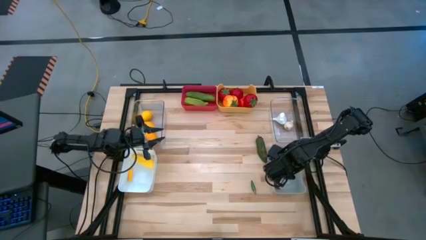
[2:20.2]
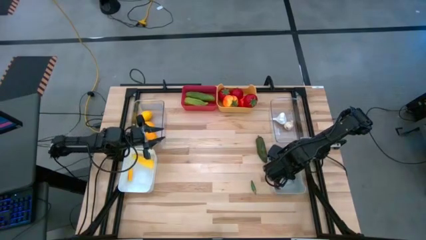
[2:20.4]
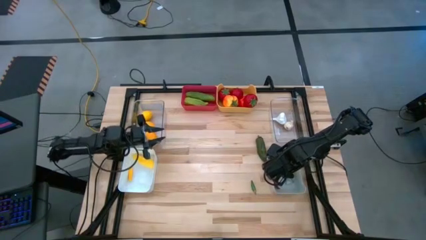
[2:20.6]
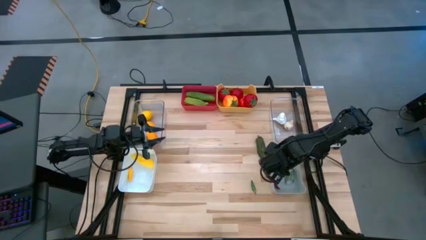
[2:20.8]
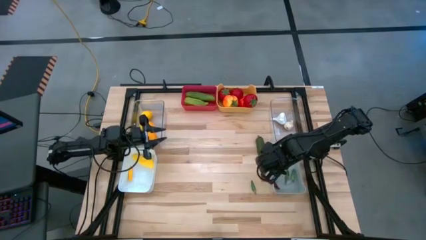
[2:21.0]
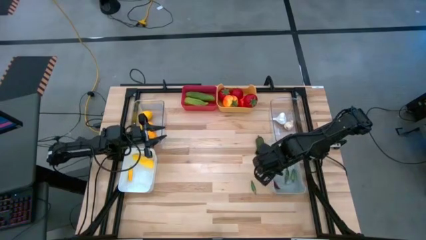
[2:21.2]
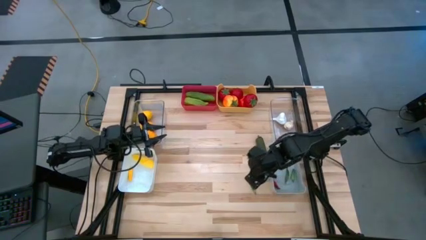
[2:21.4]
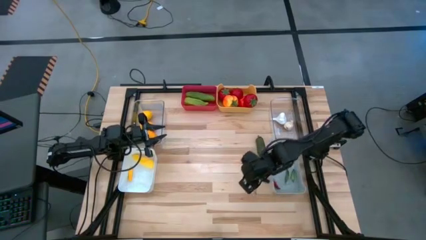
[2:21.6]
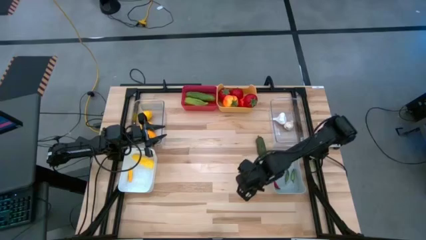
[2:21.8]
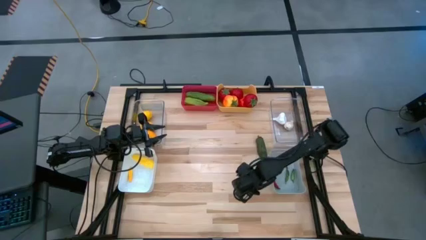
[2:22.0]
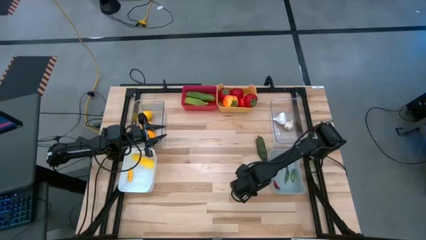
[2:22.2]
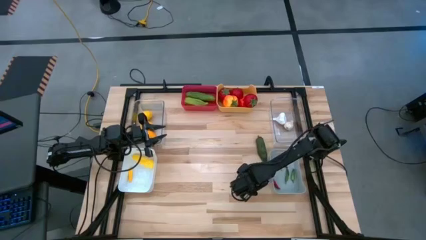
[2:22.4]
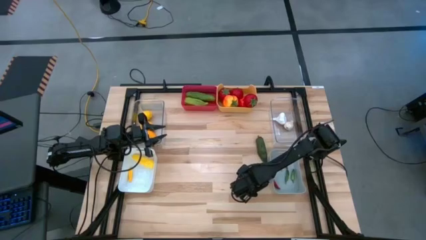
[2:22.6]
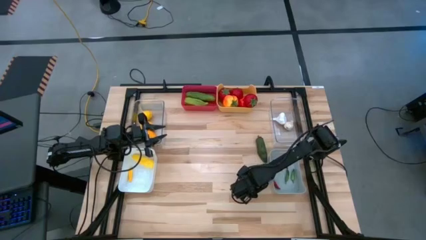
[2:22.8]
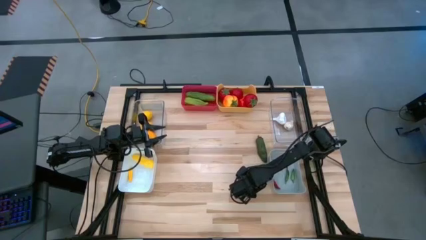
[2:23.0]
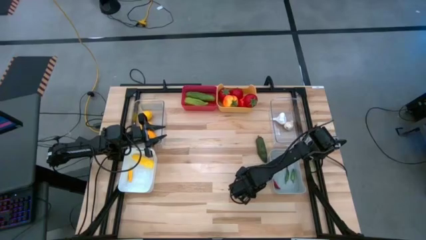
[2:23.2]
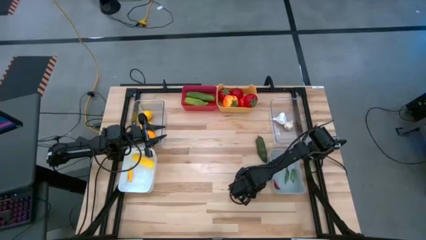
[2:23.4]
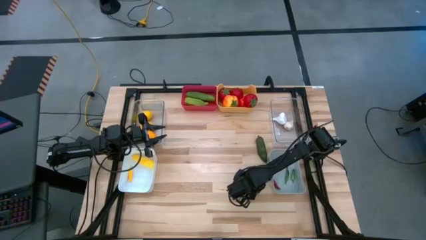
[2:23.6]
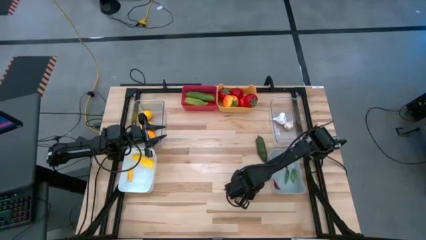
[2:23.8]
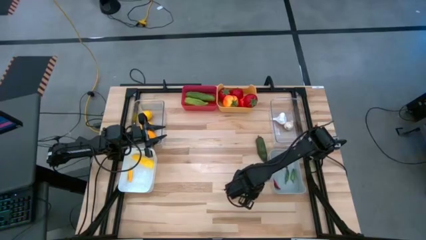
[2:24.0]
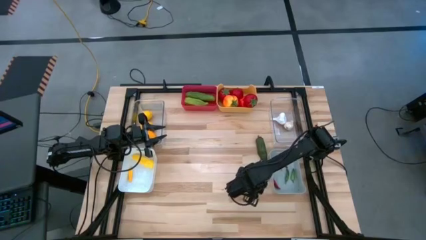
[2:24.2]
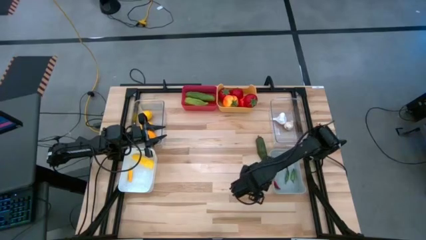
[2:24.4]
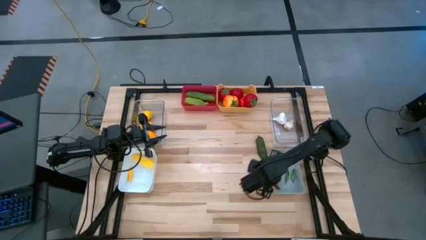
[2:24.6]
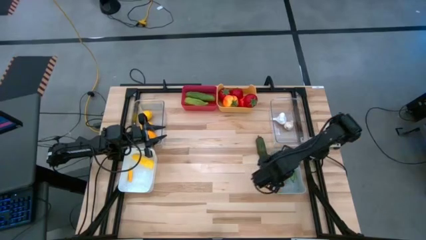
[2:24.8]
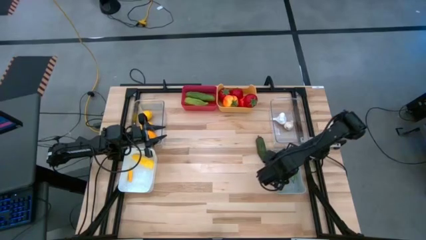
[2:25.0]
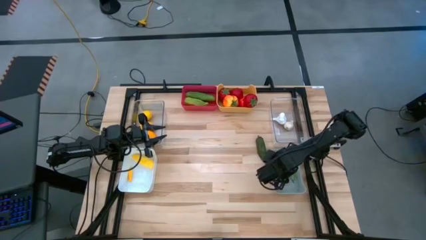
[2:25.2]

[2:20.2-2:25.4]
Task: Sort produce into baskets
Put the green chili pepper into the gray bin

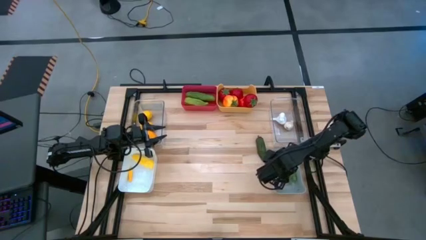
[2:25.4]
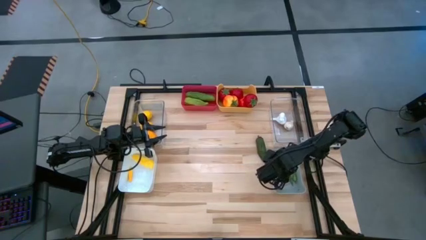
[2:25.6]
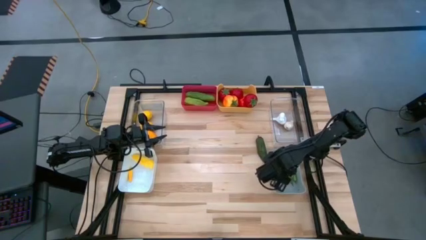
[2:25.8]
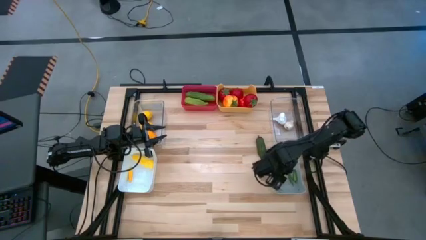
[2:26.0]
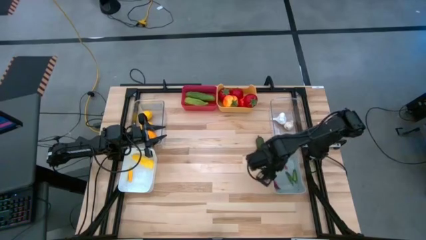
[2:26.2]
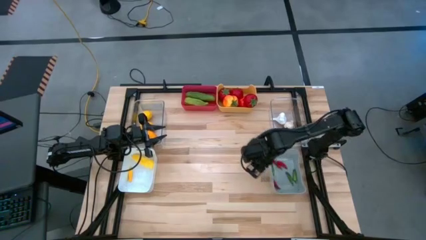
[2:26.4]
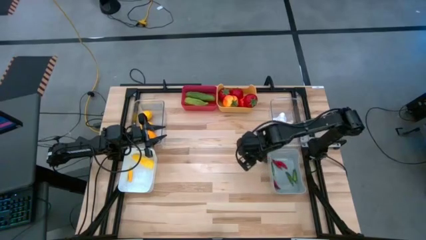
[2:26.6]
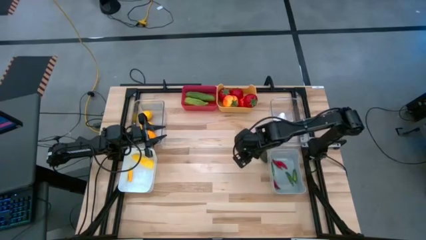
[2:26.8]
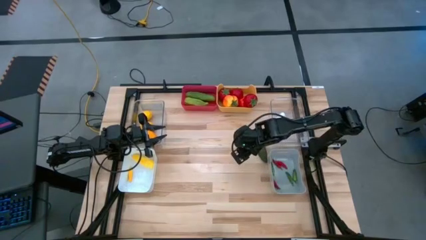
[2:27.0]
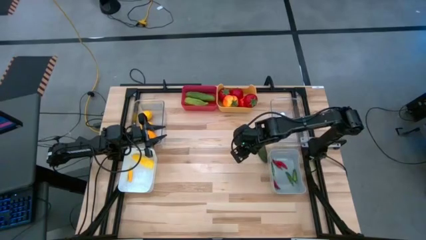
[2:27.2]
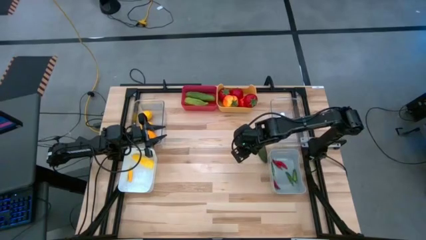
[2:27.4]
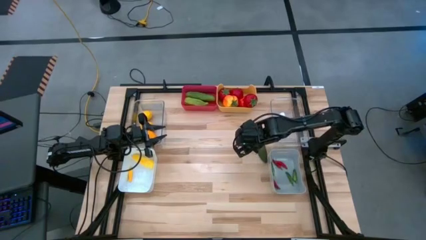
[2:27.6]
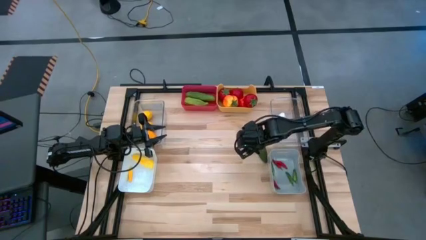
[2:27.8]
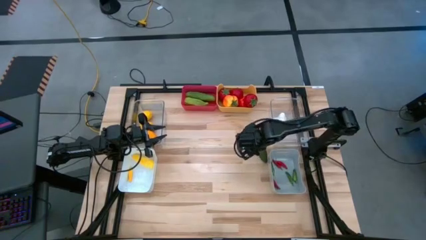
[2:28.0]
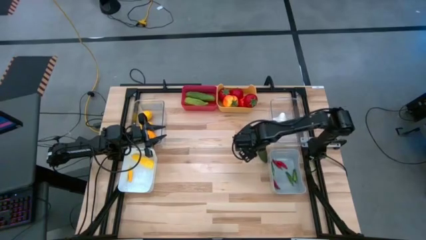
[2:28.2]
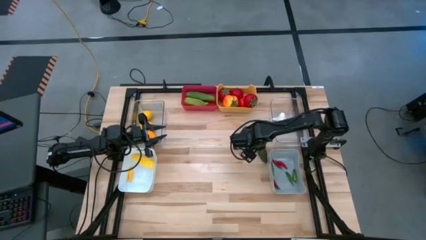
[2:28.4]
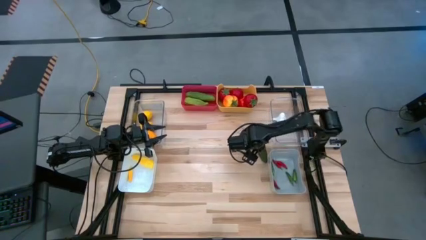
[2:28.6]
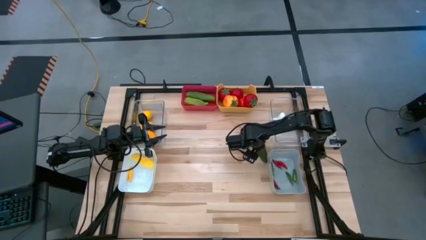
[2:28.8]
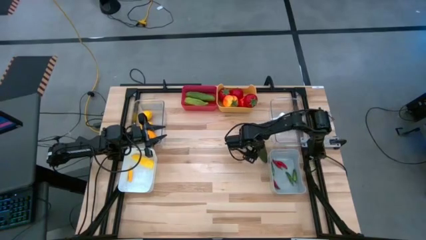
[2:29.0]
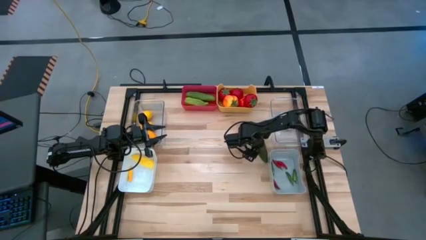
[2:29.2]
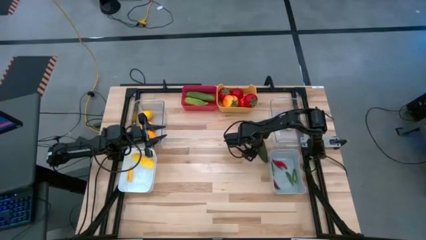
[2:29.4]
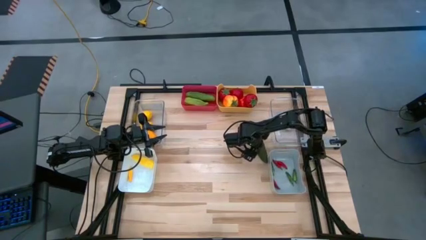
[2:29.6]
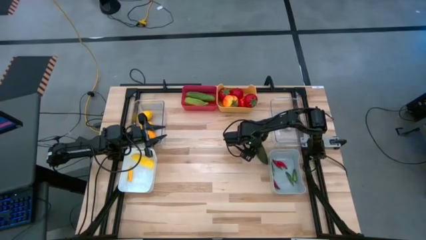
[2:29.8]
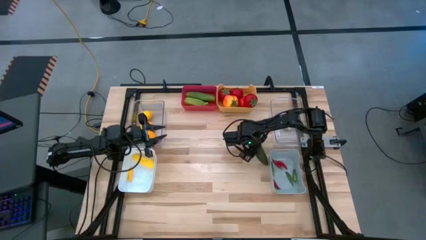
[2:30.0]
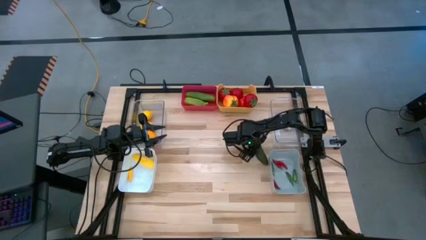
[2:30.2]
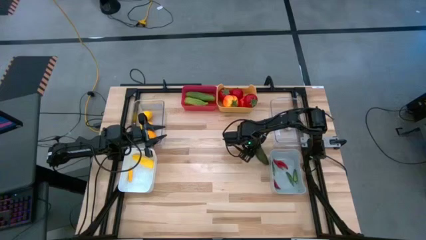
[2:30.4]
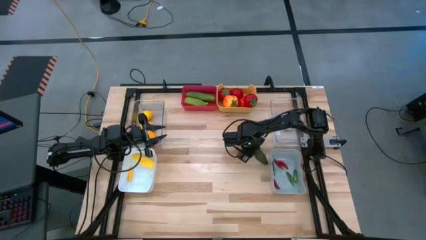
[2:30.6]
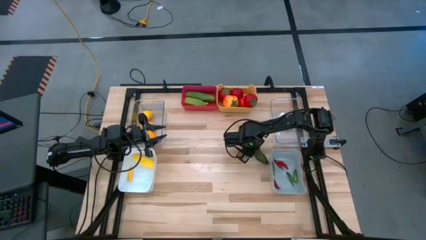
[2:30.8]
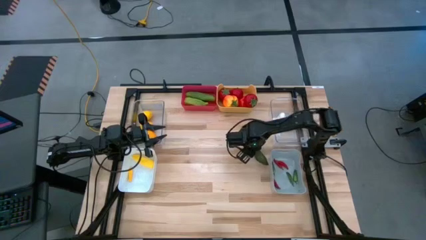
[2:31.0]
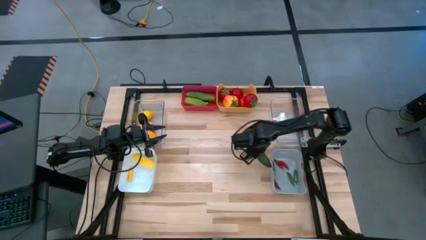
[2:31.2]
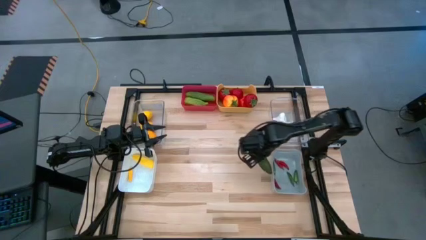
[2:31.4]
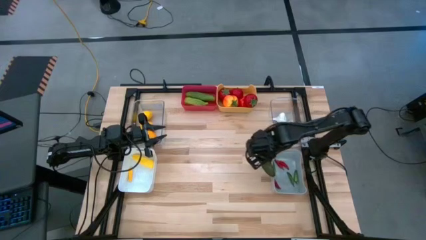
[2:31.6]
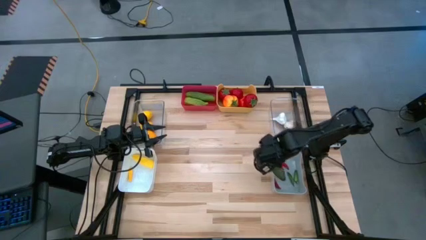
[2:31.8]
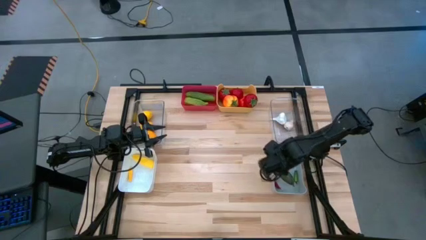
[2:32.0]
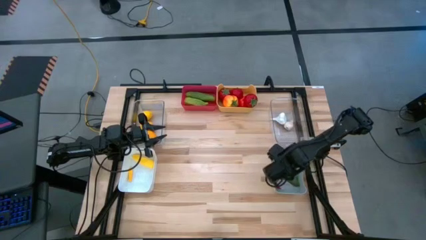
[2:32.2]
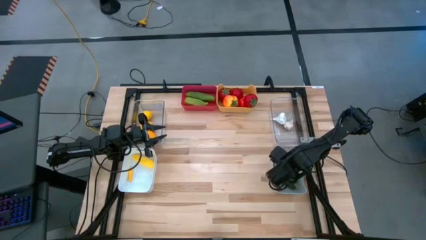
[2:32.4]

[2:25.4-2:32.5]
Put the green chili pepper into the gray bin

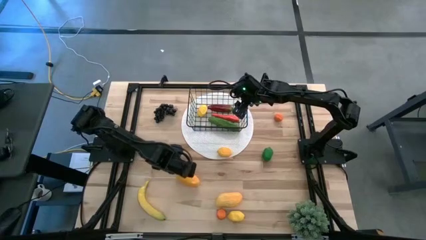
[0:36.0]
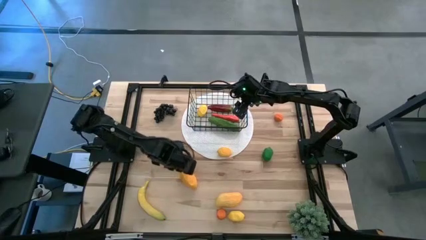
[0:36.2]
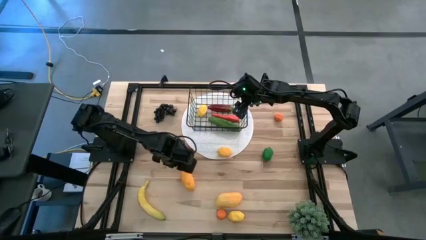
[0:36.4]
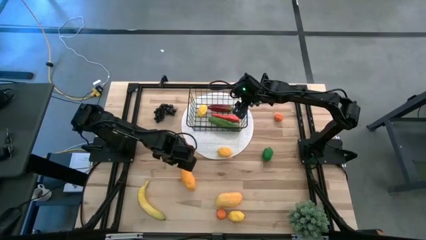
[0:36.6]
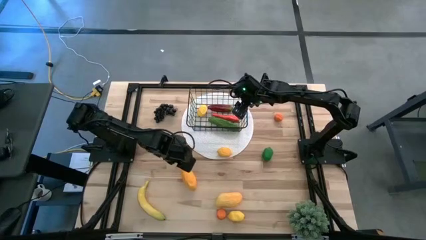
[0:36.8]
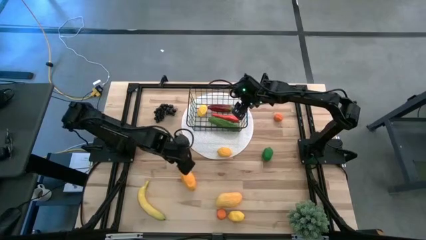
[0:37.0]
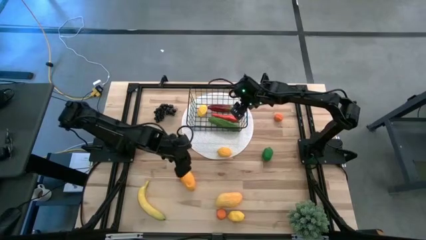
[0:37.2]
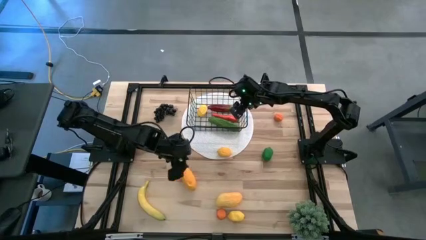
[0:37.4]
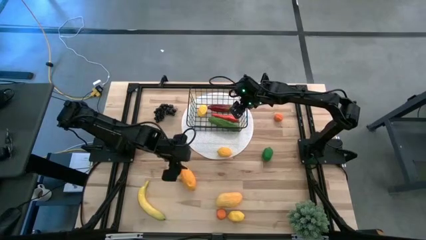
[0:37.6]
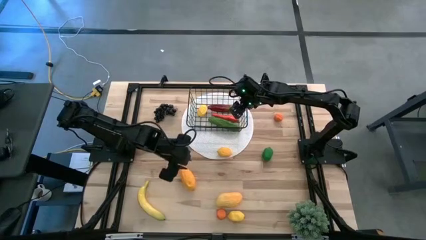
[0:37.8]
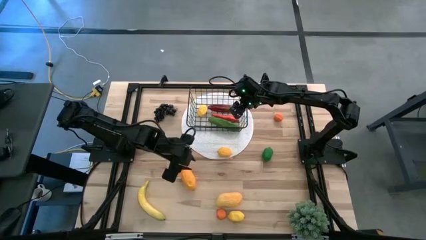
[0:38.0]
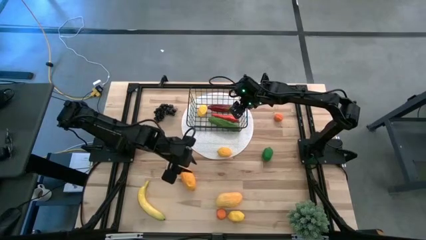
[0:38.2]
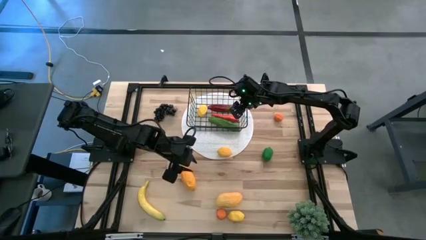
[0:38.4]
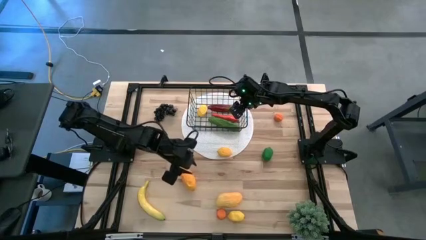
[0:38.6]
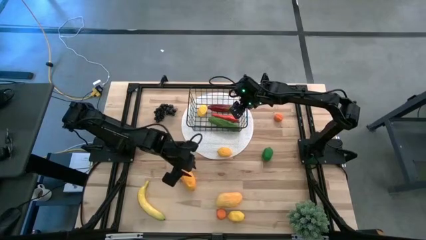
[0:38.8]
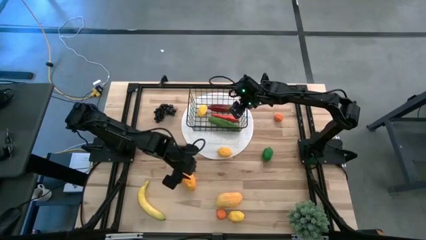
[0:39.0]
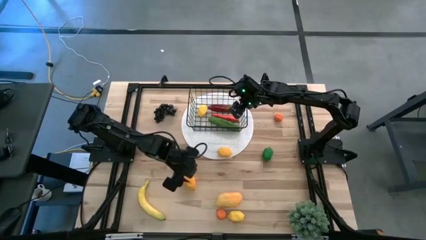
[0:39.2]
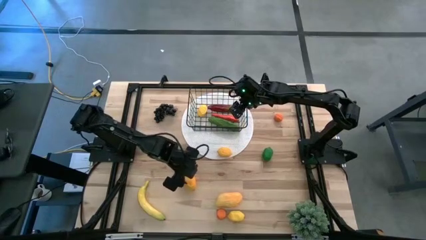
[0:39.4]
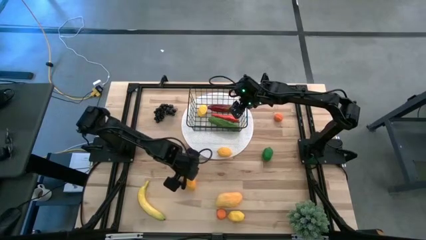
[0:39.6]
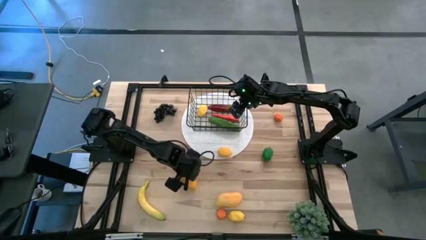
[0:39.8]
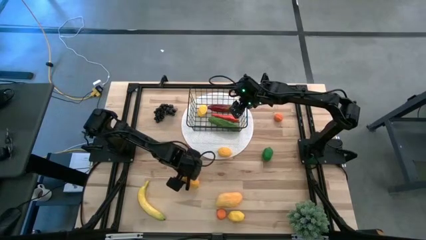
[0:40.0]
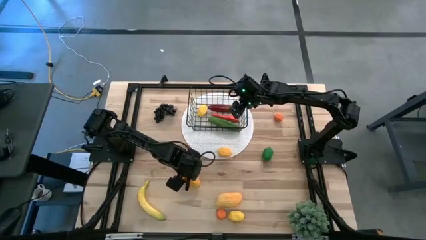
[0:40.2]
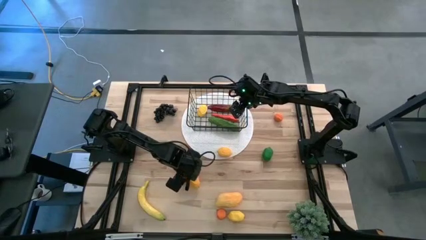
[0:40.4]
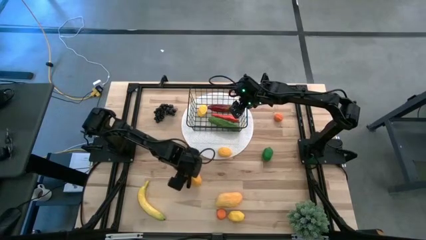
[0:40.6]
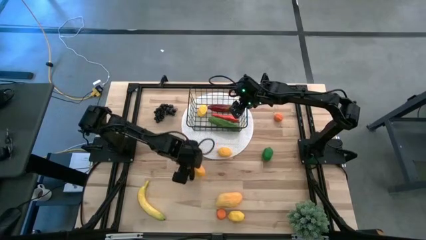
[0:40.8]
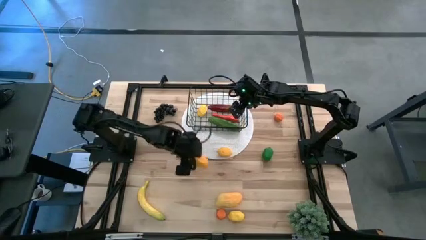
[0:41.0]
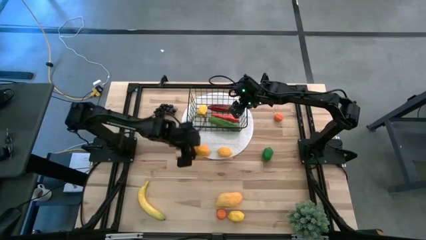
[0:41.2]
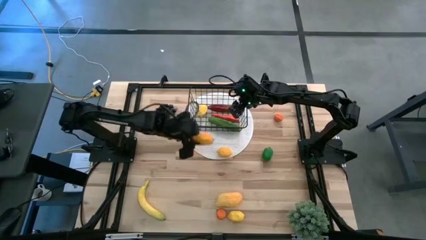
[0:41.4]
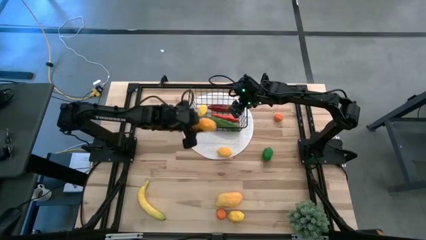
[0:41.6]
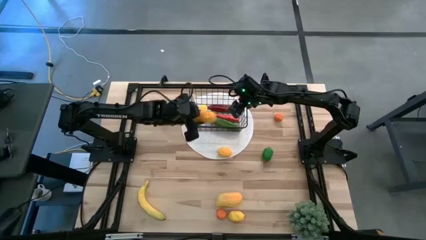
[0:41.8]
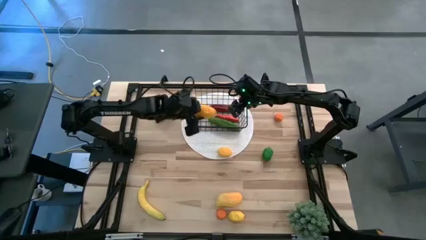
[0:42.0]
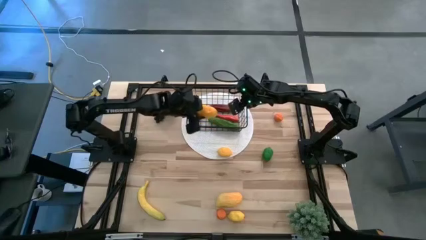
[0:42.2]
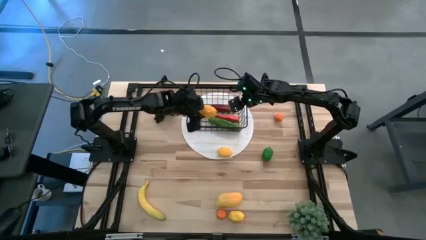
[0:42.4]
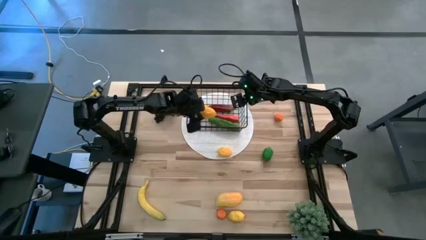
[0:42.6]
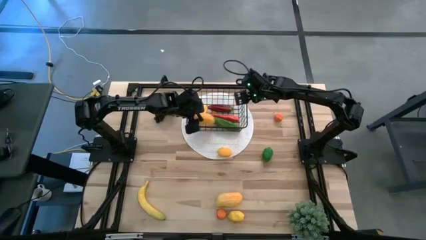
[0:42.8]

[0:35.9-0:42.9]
Task: Build produce basket
Put the left yellow mango into the black wire basket
